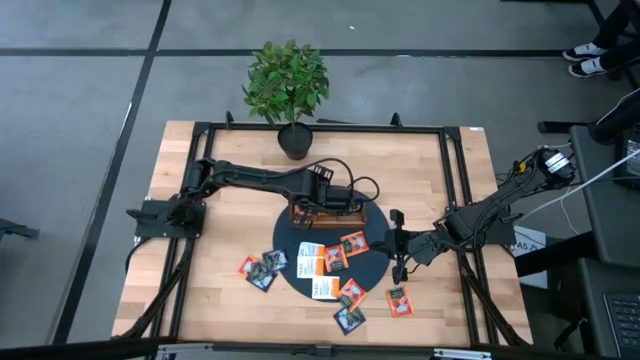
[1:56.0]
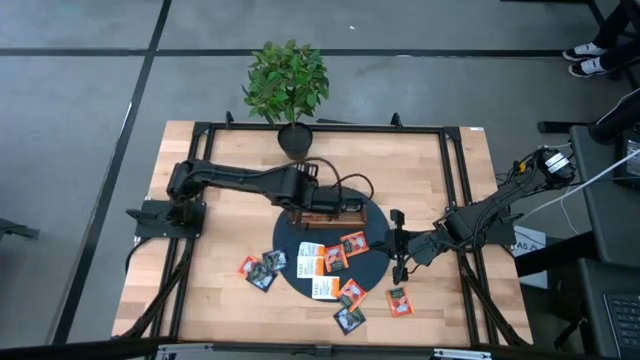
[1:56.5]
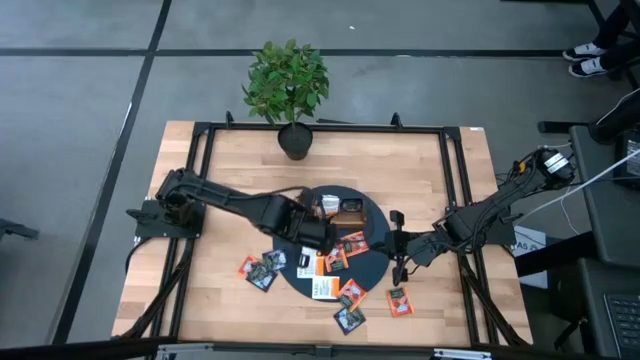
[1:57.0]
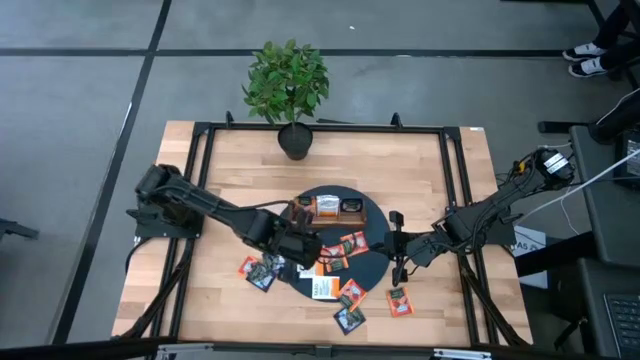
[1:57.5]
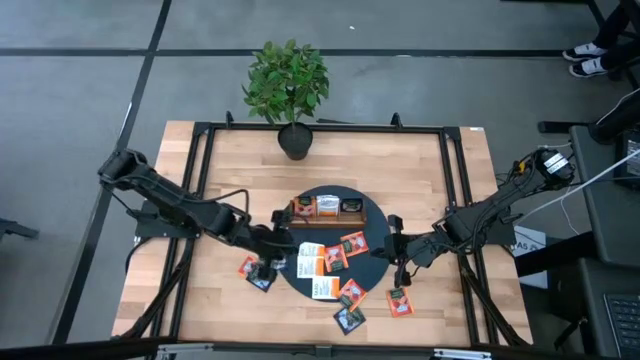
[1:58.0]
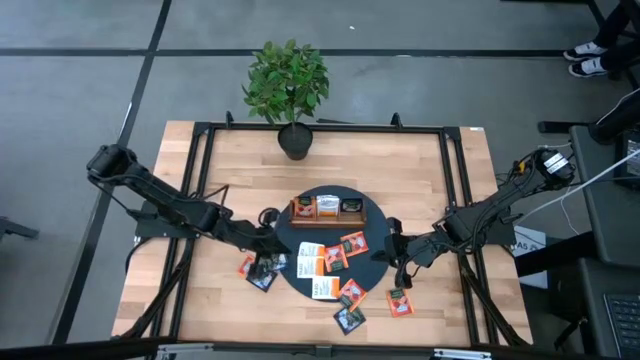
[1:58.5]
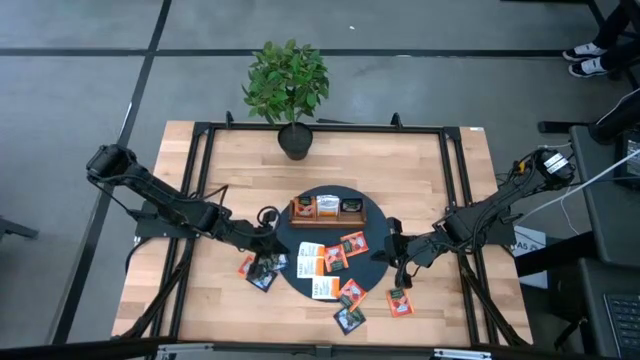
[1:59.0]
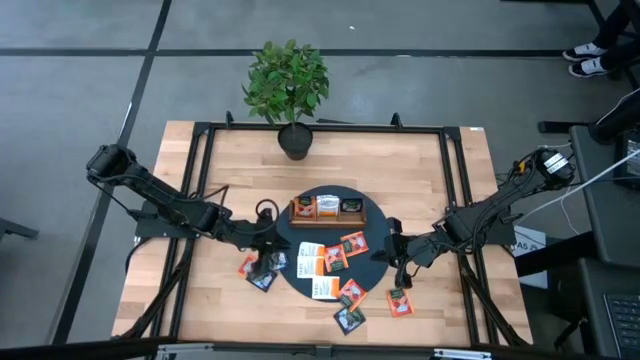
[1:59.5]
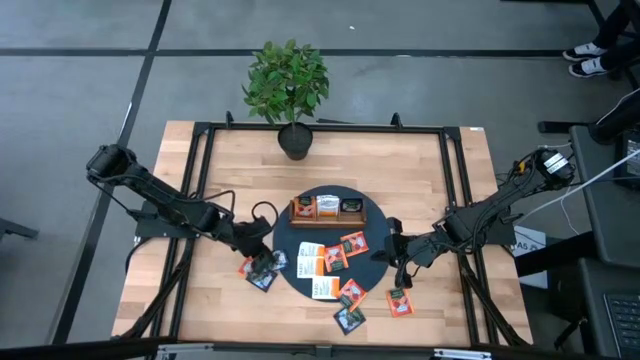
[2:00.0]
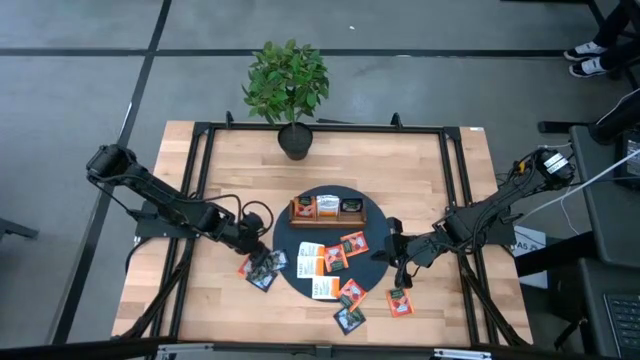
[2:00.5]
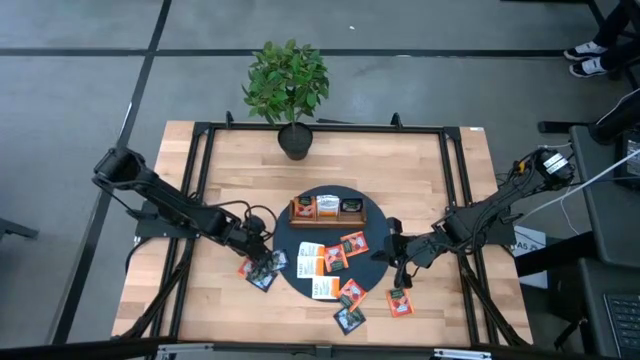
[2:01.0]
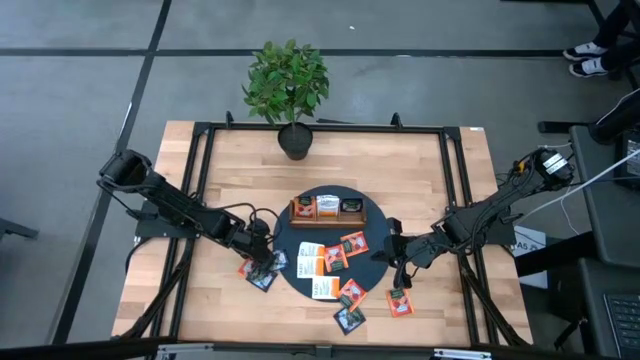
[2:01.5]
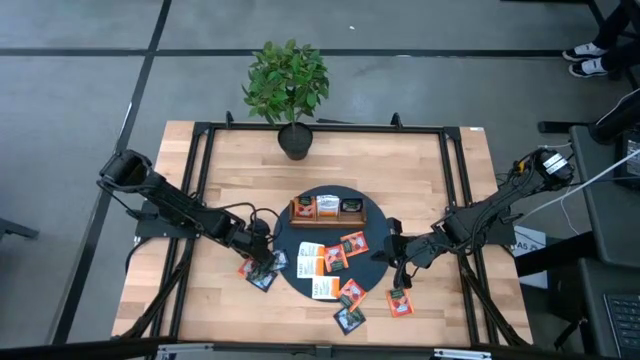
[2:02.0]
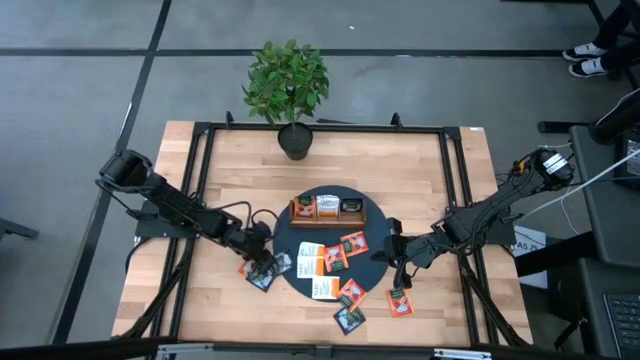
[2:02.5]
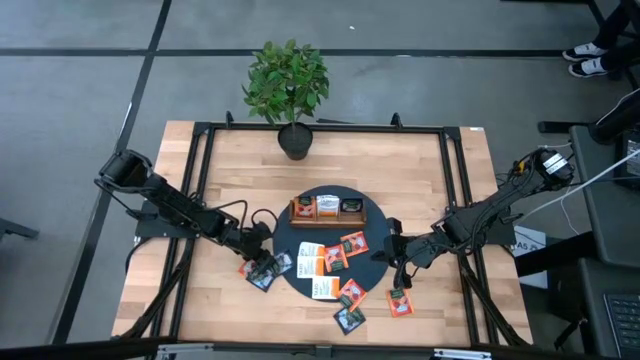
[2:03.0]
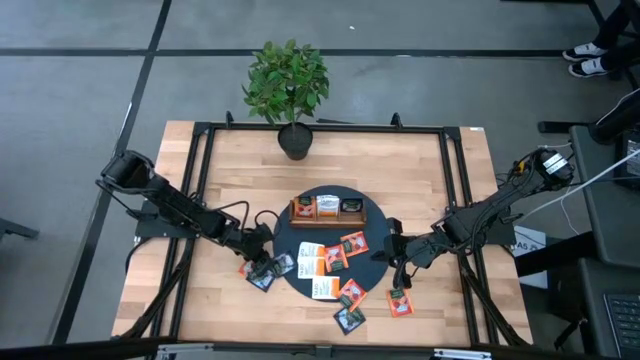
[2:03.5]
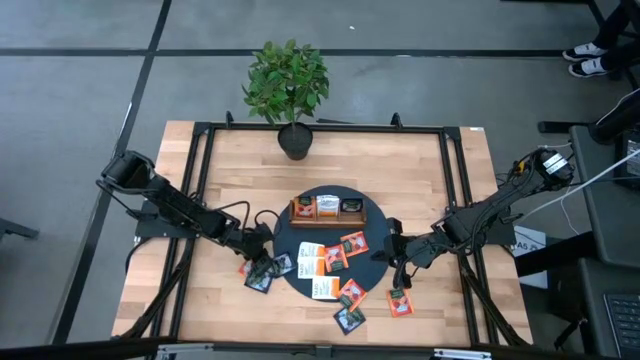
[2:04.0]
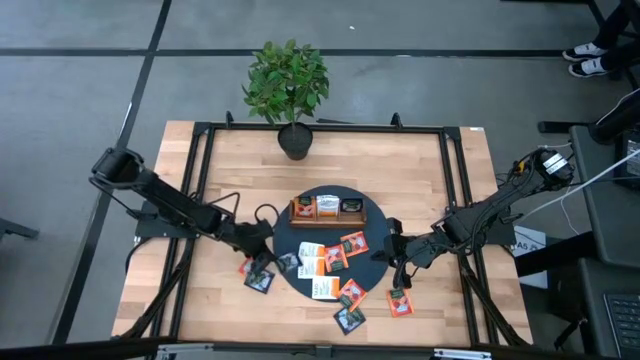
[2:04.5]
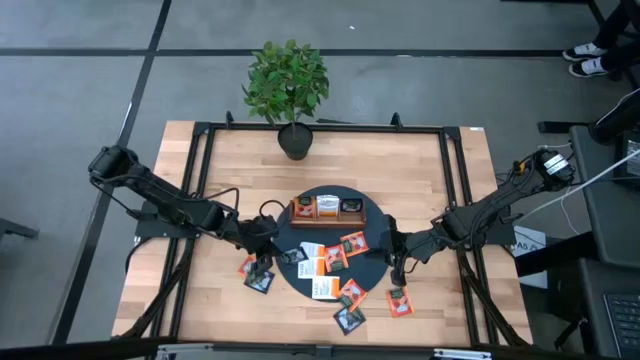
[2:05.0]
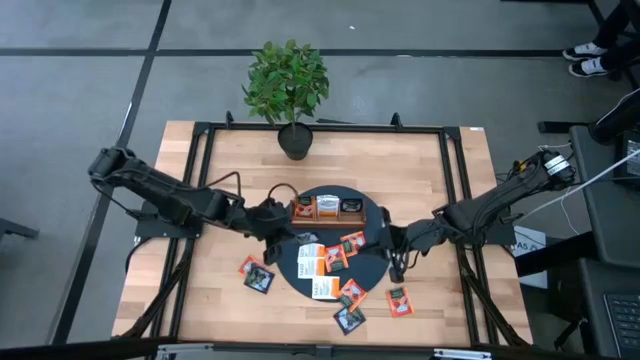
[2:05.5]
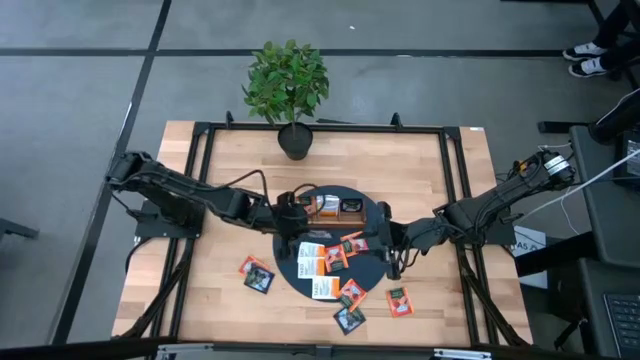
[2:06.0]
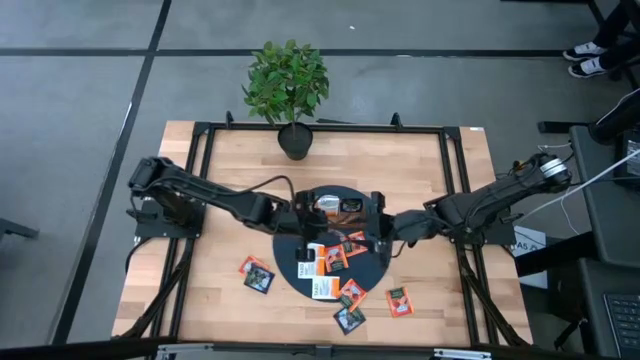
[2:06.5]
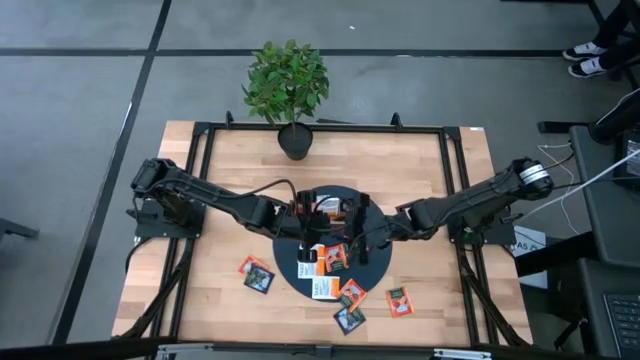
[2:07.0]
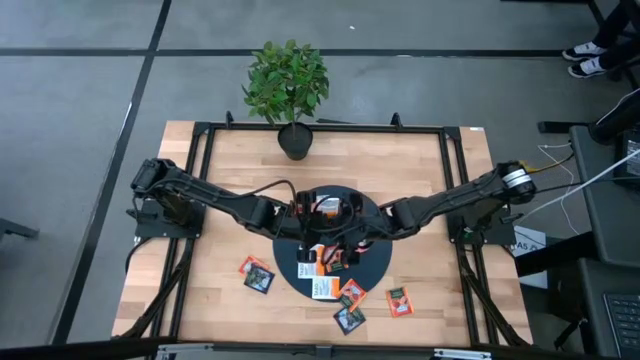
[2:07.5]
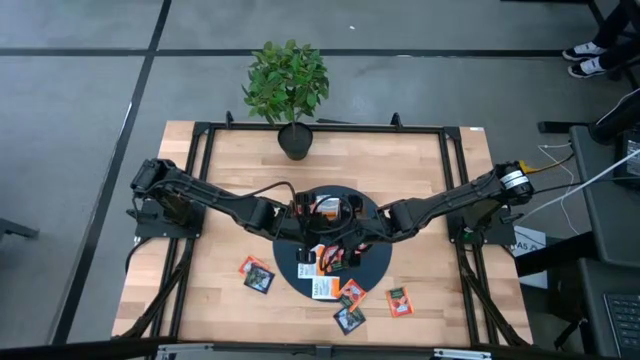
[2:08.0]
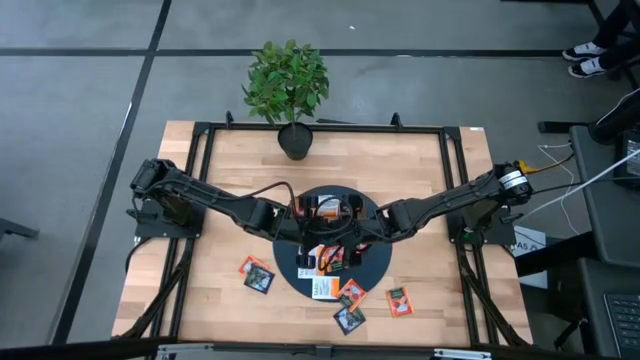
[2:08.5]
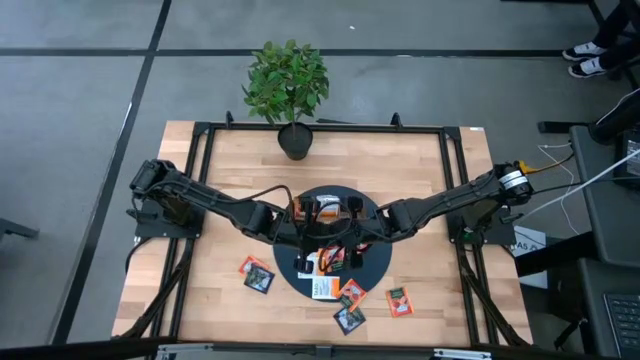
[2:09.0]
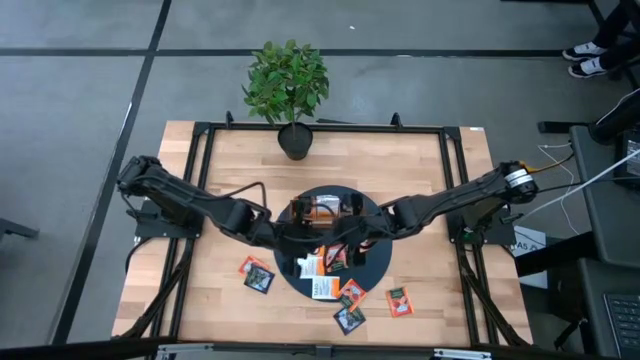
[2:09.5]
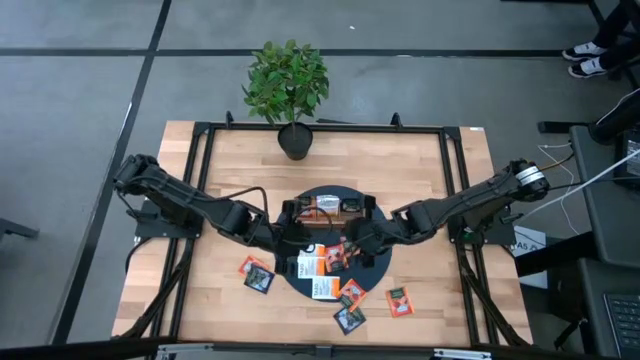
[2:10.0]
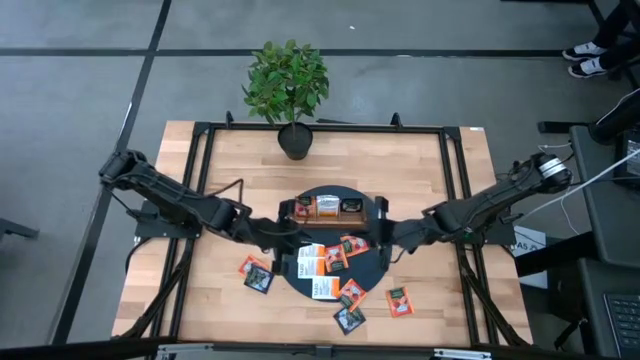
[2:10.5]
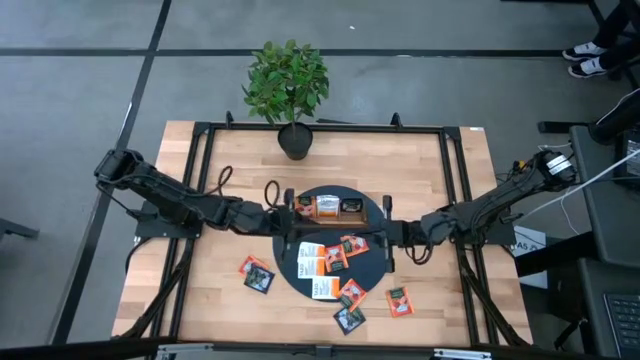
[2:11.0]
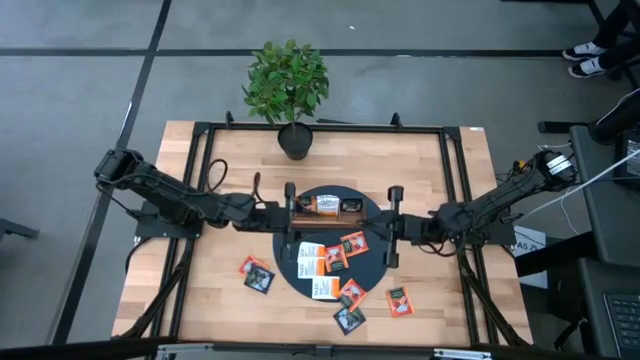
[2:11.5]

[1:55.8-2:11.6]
Task: Pick & Place Tea
Put the violet tea bag into the right side of the wooden organizer

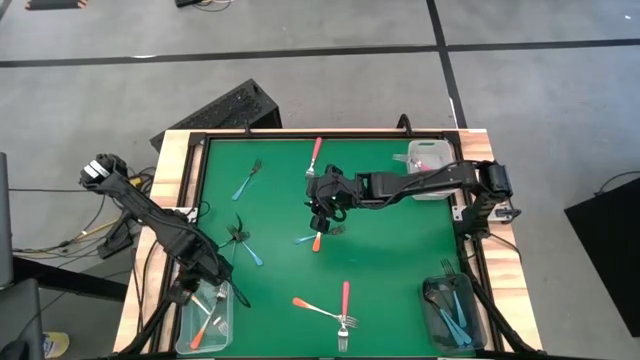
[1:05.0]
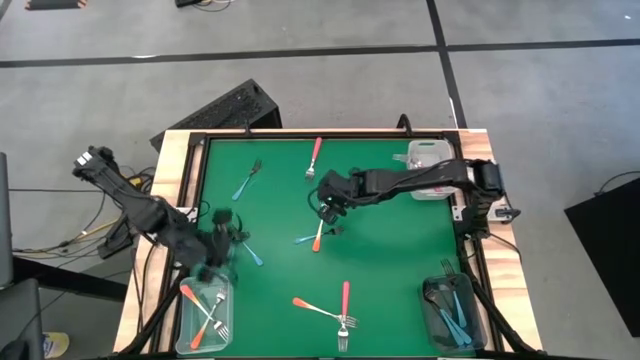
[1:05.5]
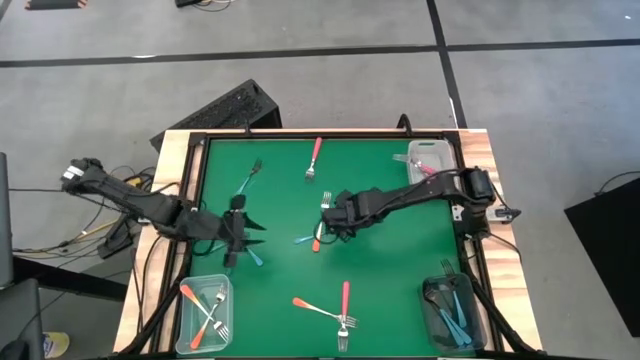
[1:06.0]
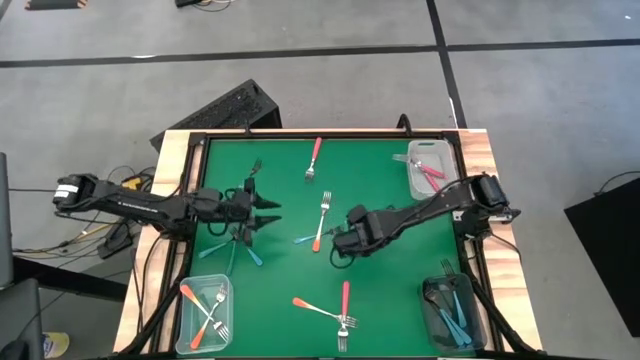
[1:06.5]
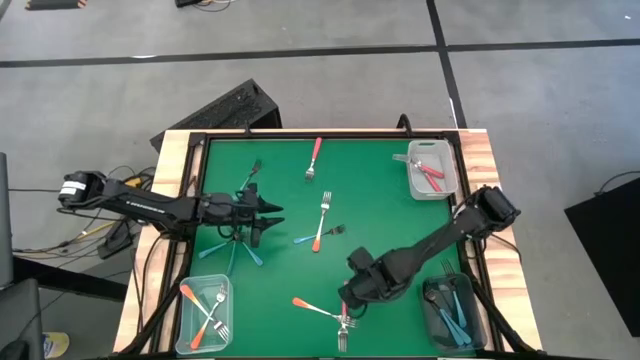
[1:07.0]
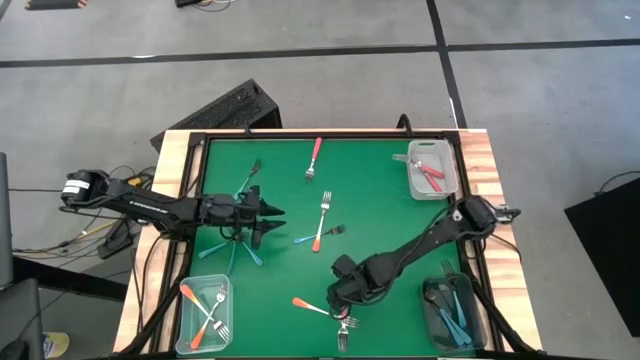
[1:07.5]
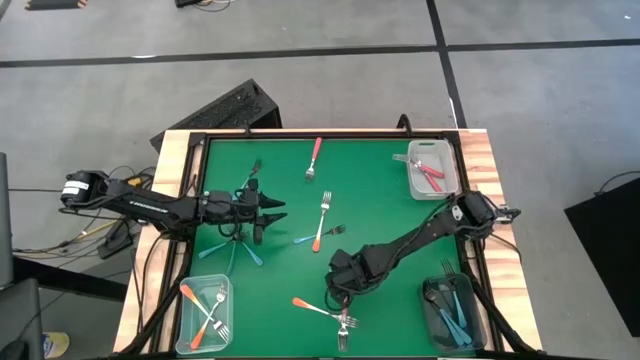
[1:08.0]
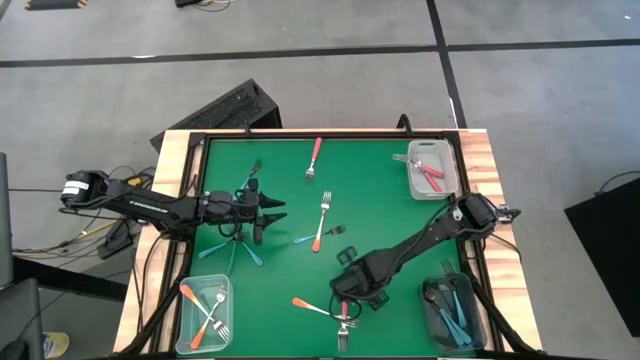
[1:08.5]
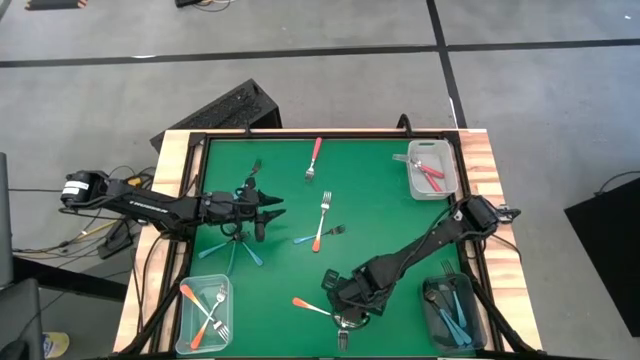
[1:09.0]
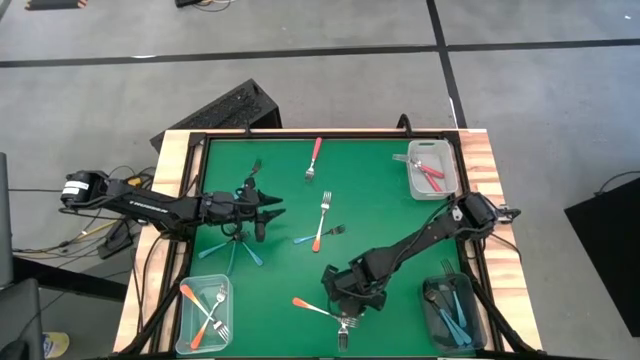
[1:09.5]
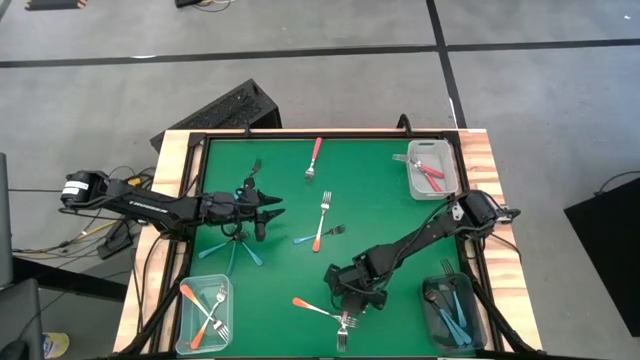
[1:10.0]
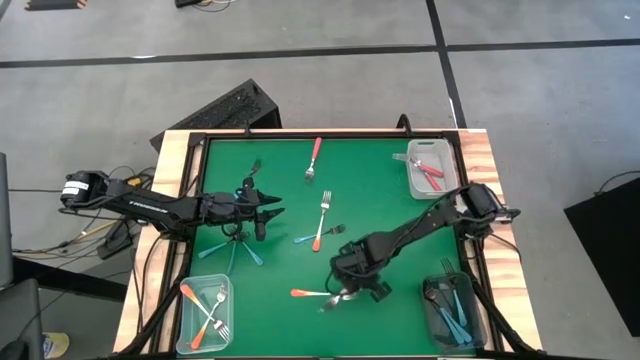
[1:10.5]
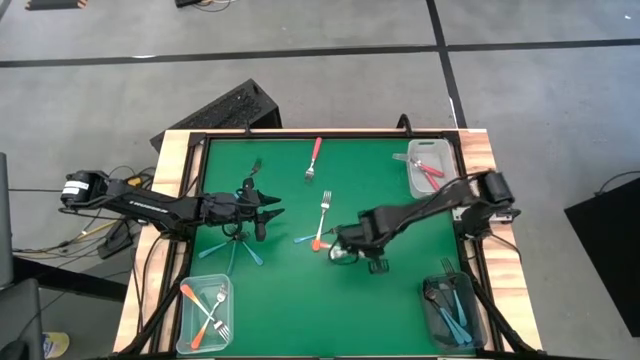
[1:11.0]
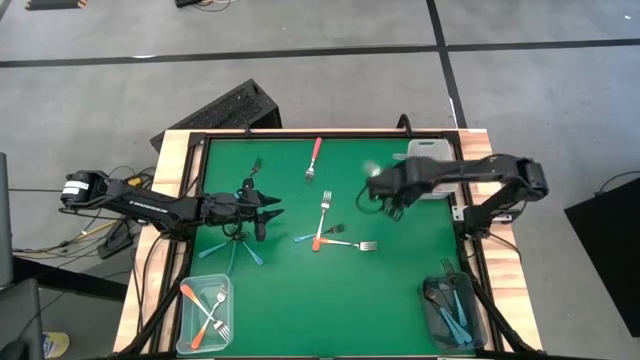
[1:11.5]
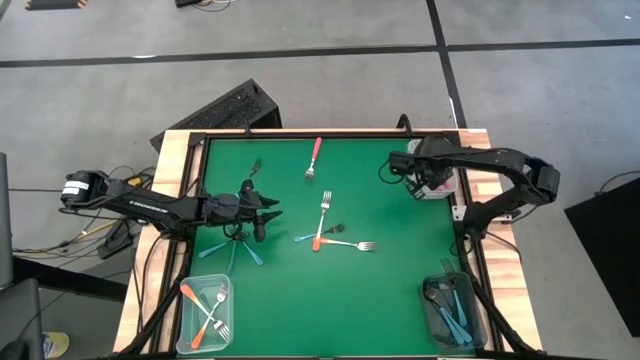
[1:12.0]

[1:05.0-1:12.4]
Task: Sort silverware by color (type)
Put the pink fork into the transparent bin
